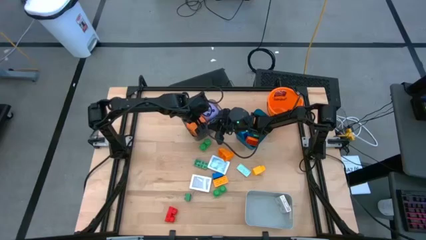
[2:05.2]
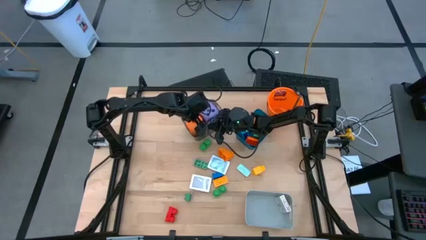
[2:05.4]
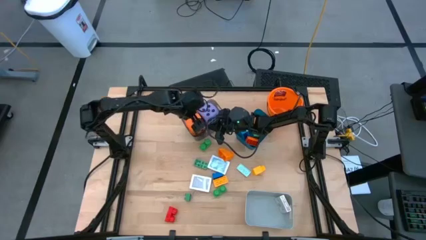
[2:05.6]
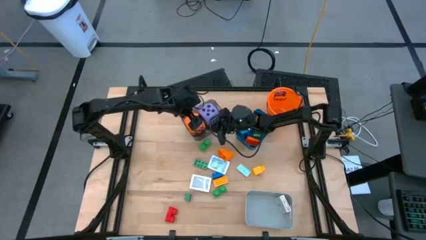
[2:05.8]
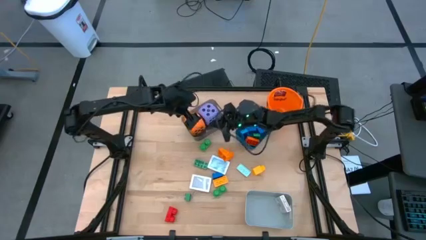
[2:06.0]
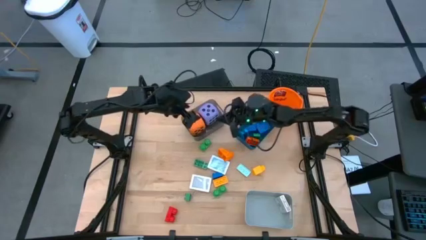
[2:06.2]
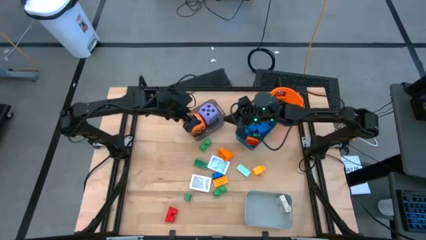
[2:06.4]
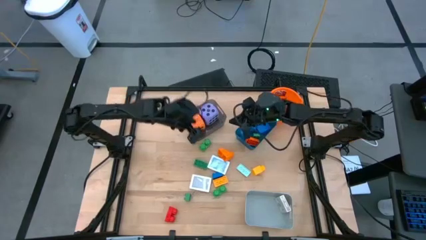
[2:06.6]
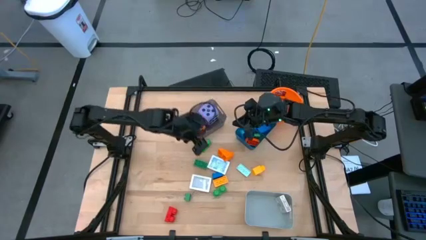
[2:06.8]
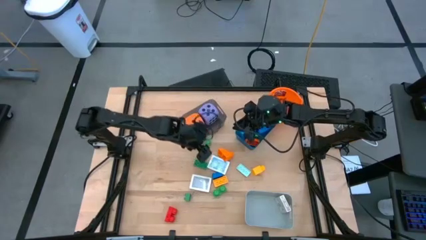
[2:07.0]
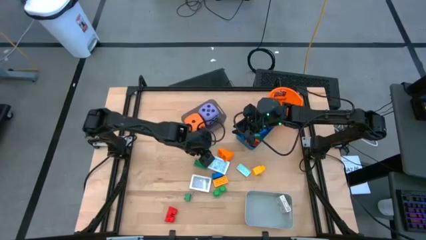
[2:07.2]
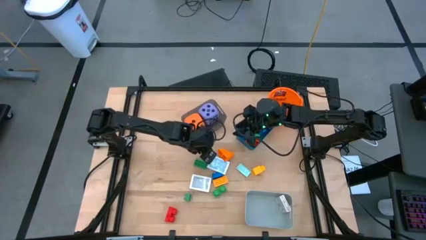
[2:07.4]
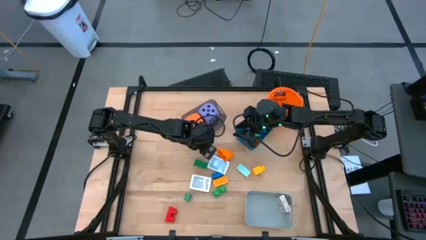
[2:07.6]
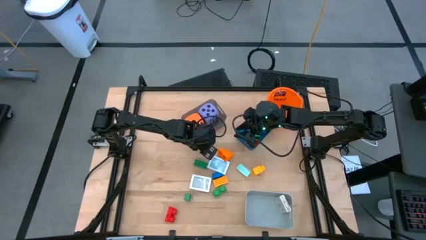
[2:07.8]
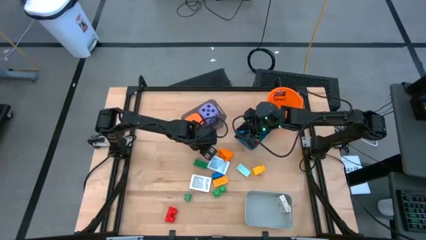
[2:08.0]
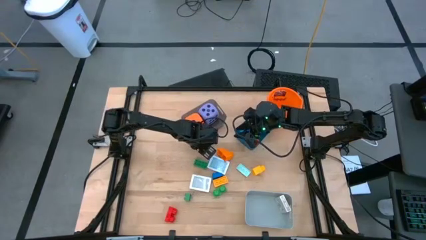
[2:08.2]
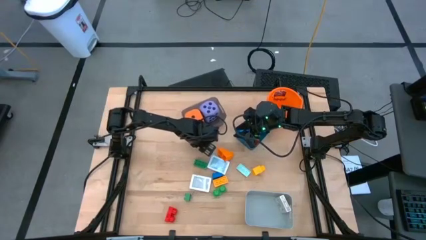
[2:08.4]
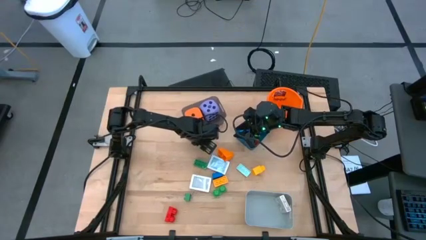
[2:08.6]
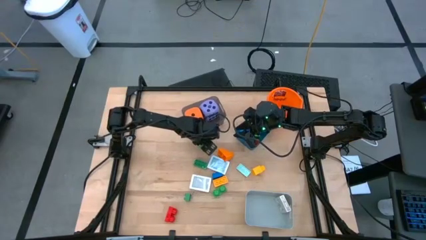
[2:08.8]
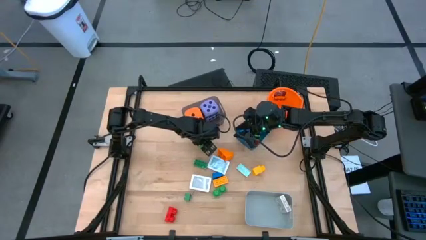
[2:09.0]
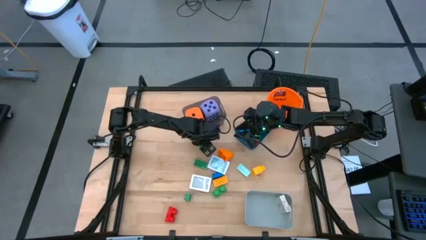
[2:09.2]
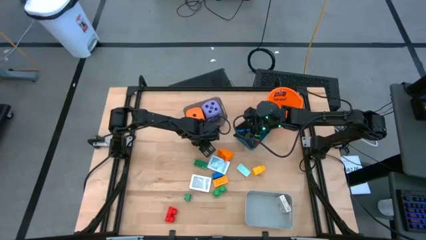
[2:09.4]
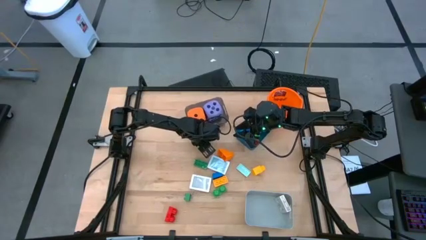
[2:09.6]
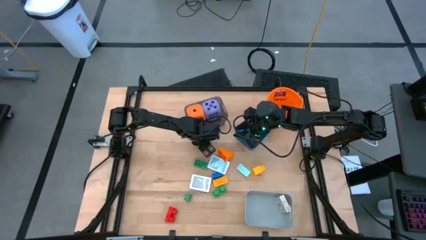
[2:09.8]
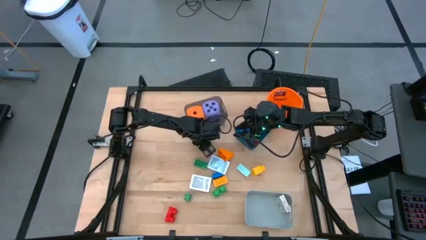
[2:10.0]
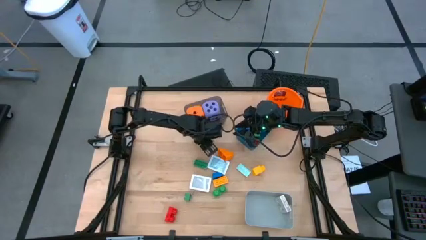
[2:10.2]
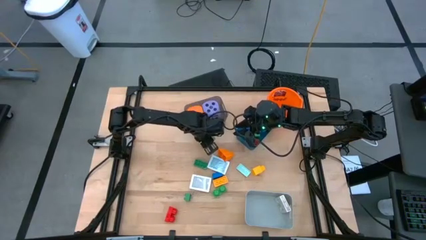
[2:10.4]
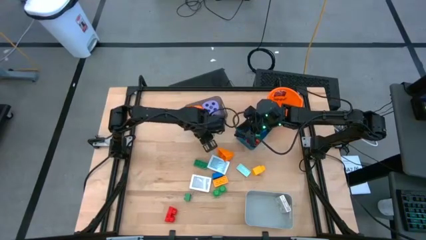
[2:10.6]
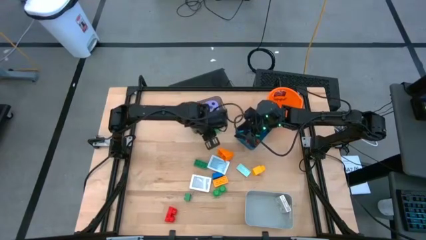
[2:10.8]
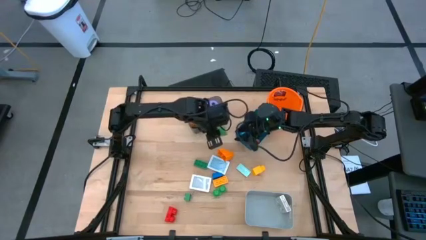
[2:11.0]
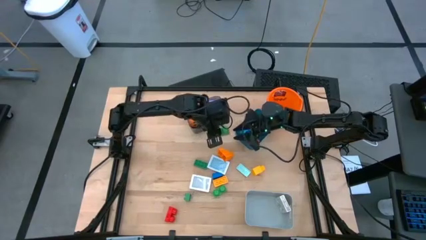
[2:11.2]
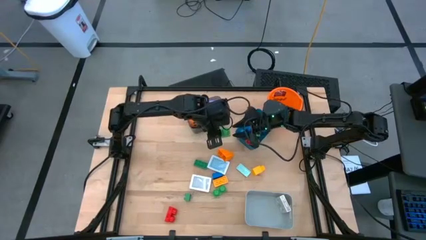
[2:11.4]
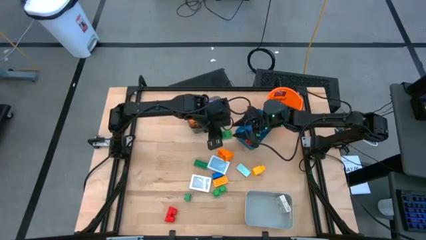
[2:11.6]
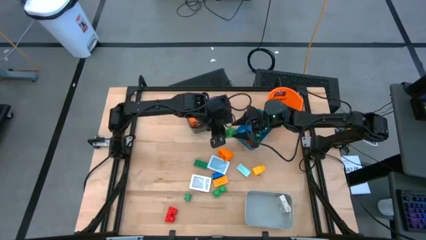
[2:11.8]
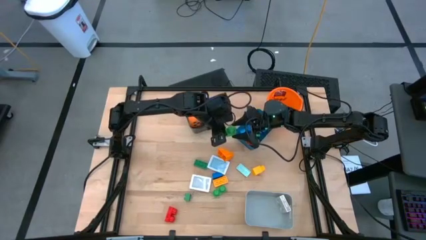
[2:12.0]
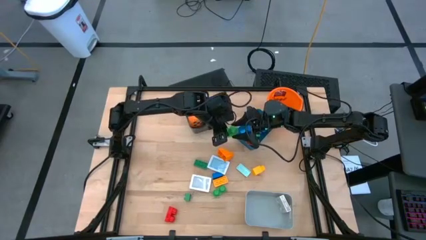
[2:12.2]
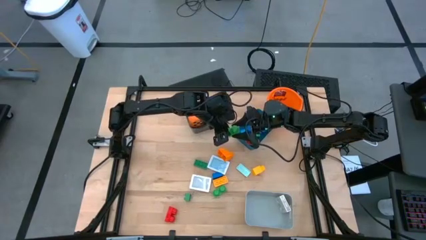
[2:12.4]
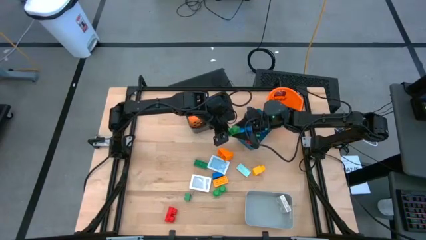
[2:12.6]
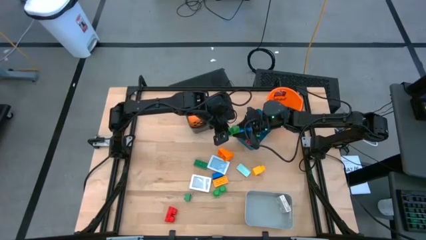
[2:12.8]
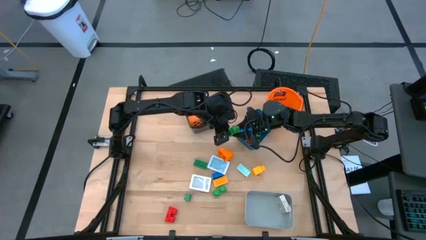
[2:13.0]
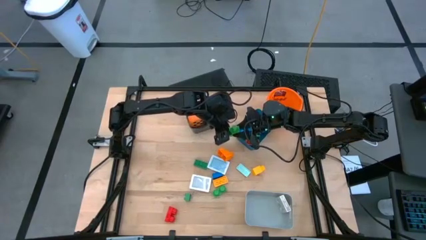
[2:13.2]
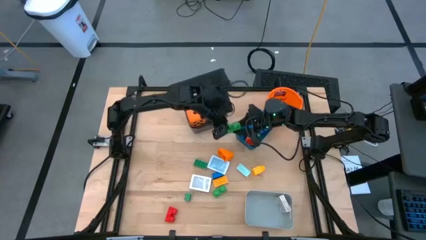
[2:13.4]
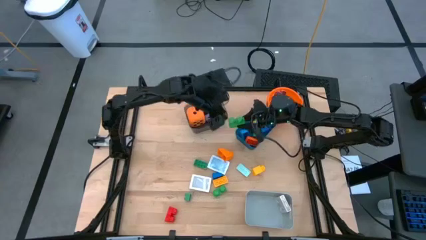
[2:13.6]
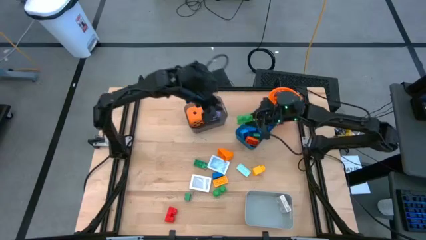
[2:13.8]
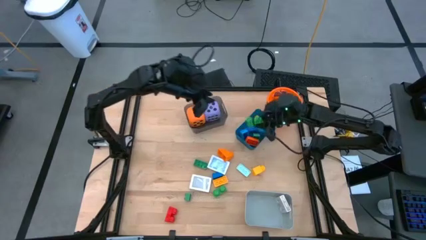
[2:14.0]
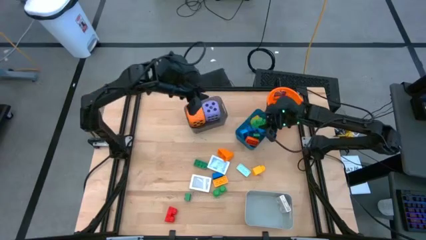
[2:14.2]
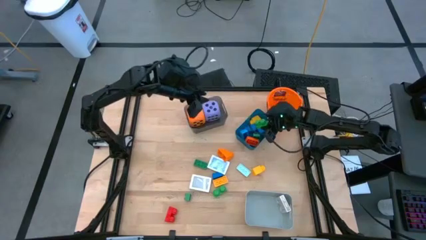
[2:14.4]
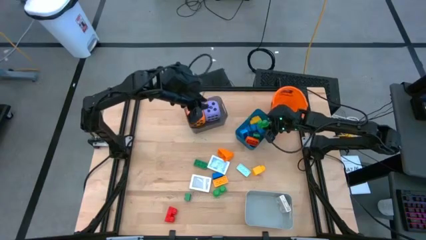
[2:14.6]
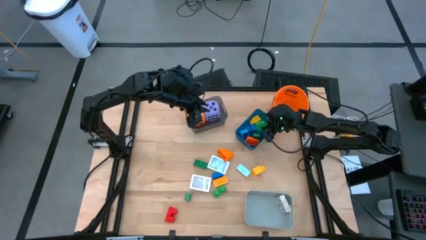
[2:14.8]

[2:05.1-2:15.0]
Task: Pick & Place Toys
Put the green game piece into the blue bin

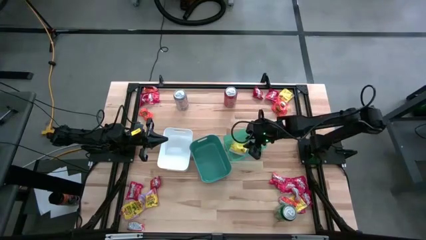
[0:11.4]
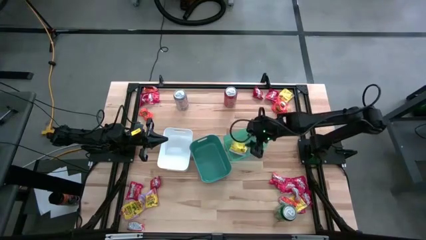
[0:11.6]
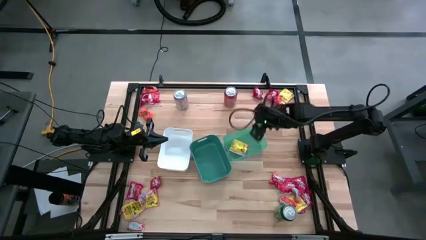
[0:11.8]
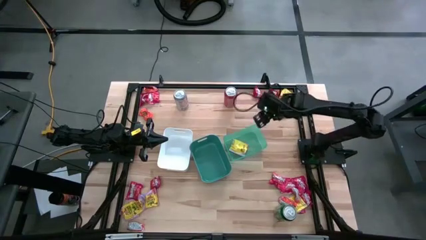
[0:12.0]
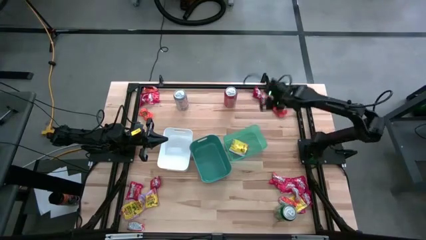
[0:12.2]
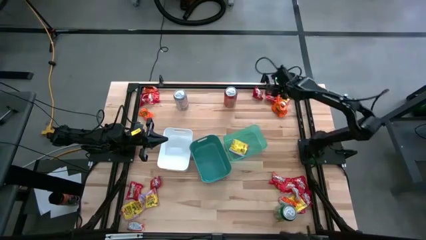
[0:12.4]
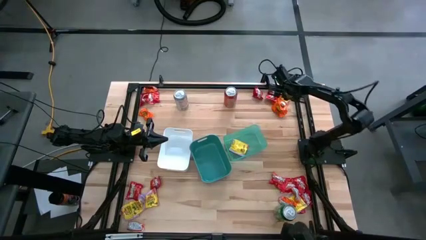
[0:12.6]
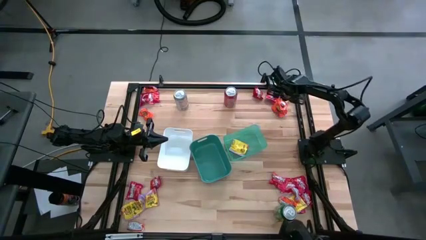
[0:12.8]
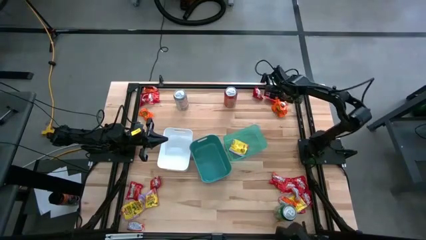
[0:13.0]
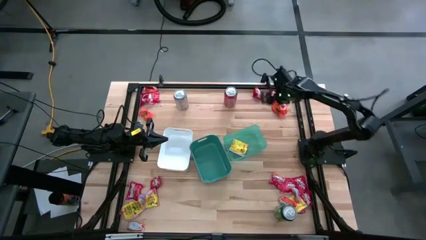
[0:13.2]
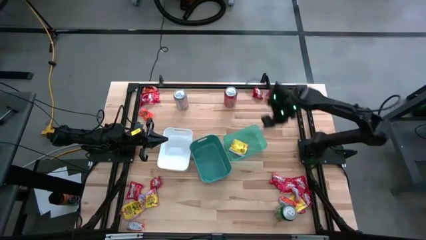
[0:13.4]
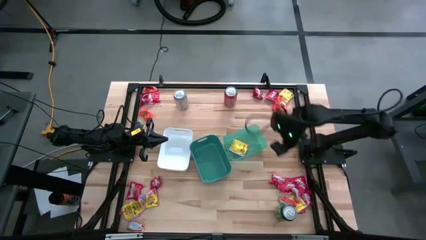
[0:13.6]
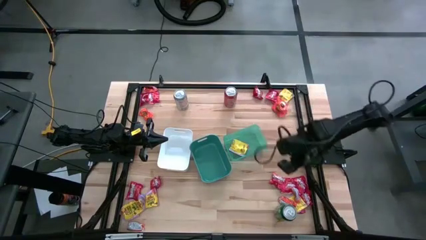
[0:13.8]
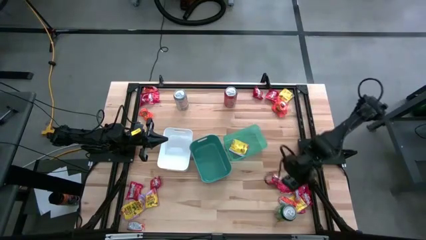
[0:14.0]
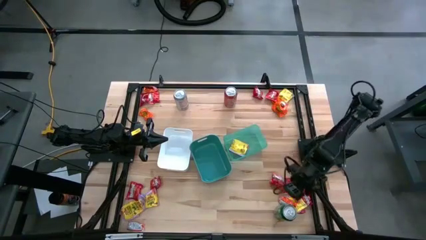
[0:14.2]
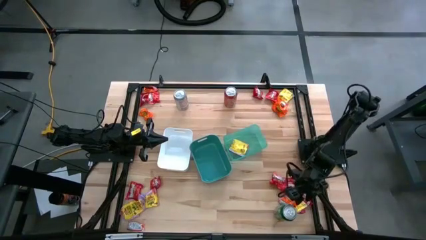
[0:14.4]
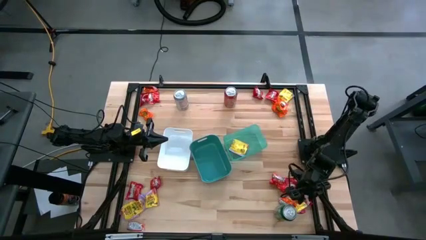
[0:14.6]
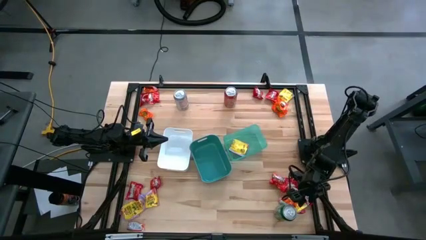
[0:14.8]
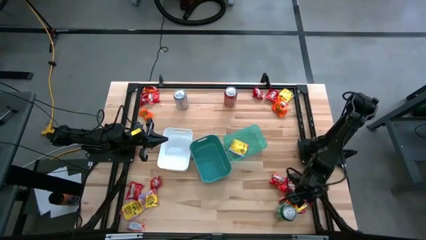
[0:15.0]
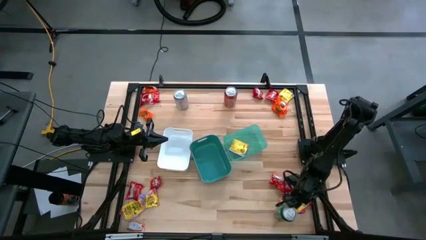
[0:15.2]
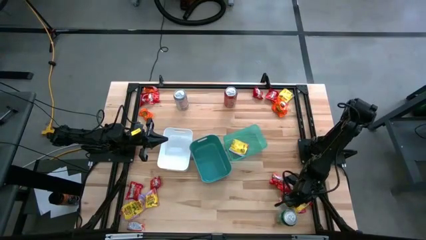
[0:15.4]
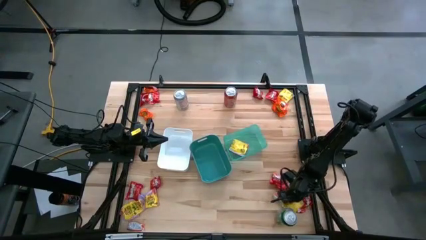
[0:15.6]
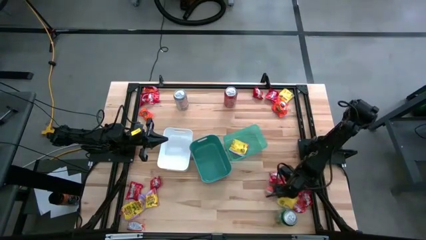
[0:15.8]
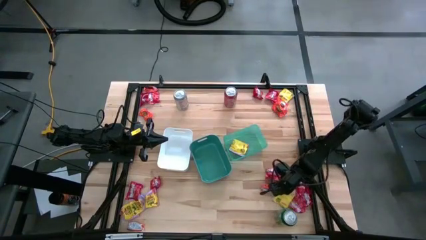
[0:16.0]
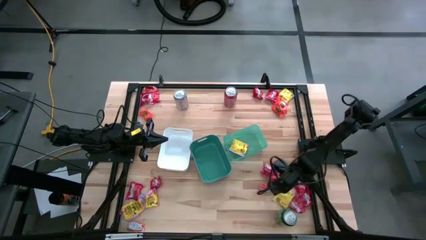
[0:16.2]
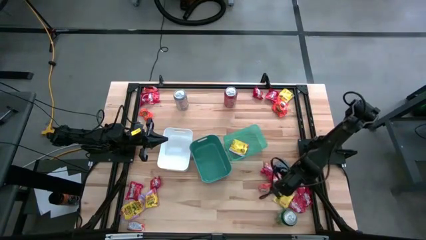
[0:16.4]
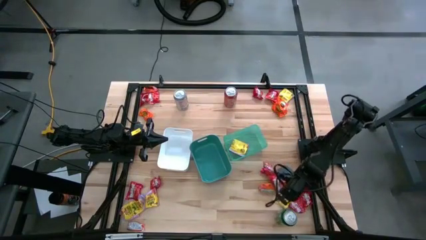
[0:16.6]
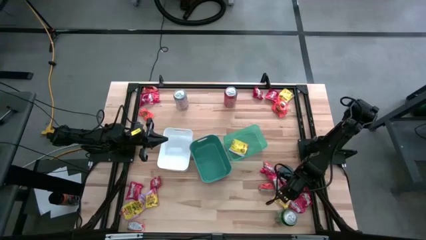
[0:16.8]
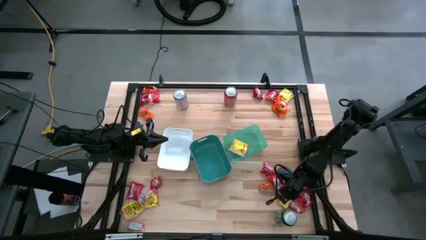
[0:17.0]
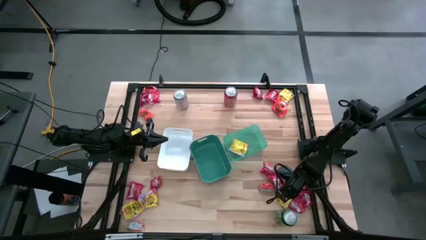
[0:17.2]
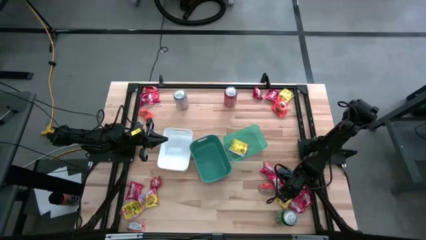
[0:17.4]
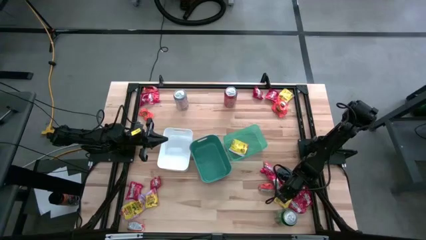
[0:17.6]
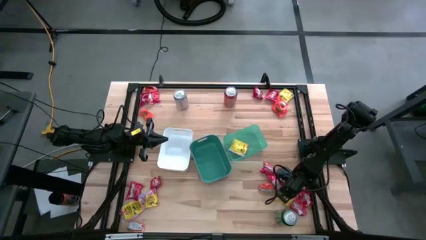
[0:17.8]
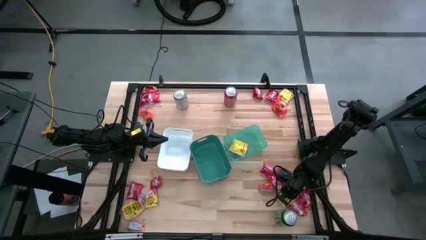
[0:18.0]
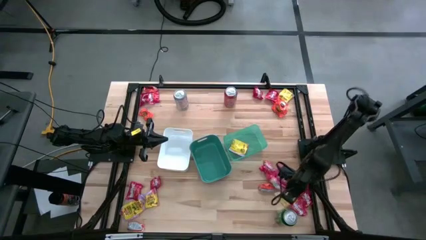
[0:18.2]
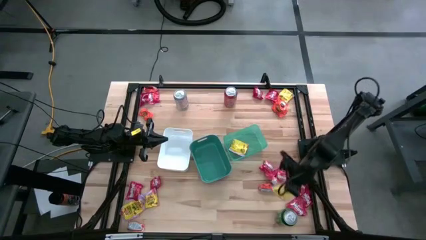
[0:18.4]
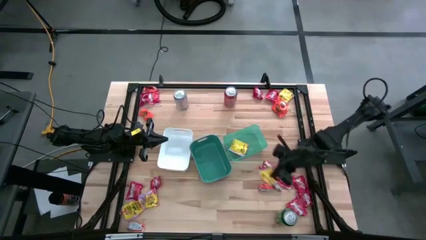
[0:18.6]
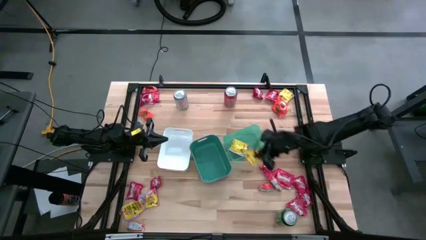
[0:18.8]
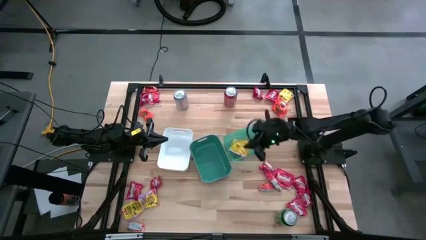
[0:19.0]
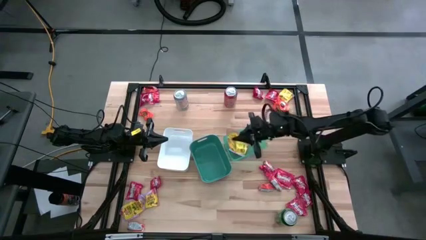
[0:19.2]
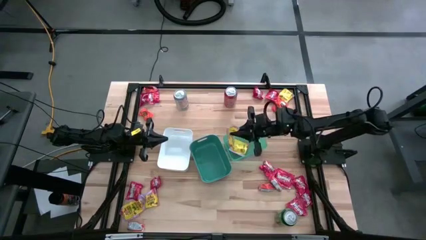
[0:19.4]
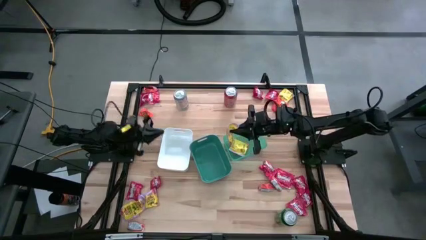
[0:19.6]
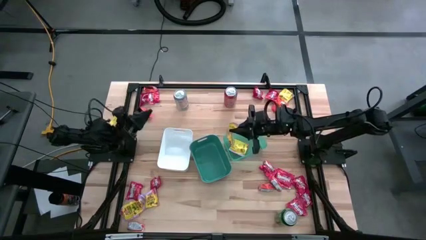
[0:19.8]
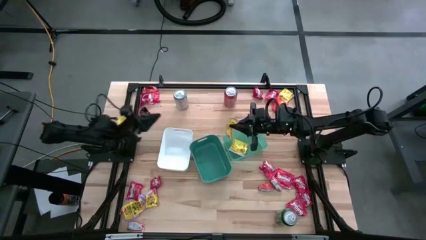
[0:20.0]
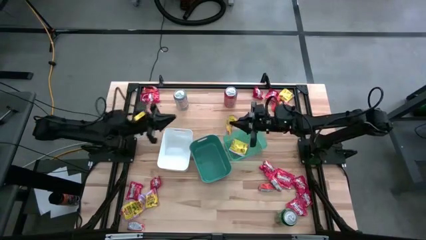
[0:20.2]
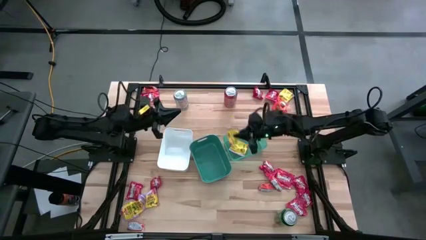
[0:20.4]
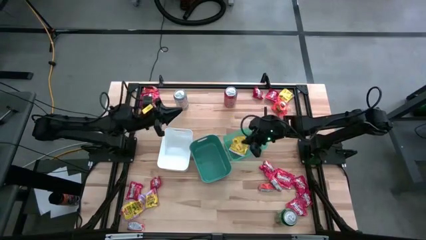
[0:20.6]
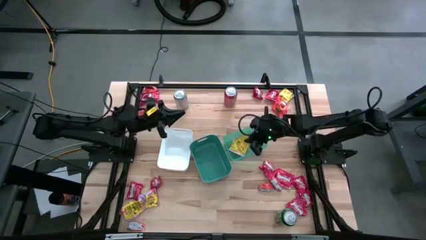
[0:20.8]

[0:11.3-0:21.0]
Task: Sort candy
Put the yellow candy into the green transparent bin
